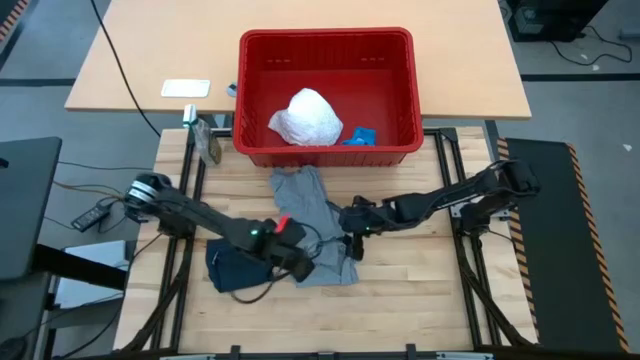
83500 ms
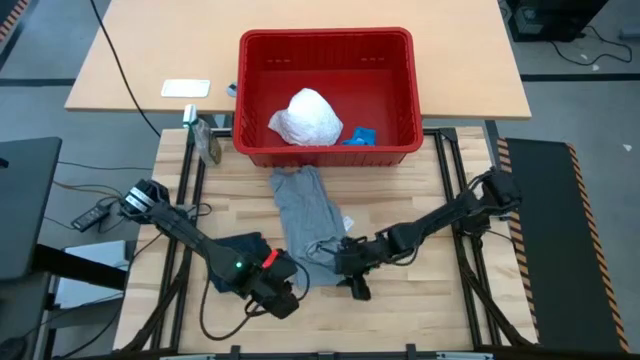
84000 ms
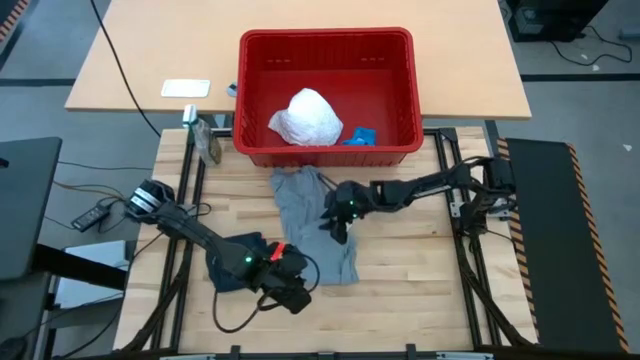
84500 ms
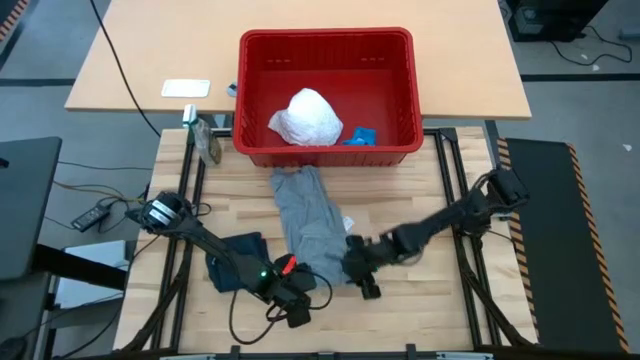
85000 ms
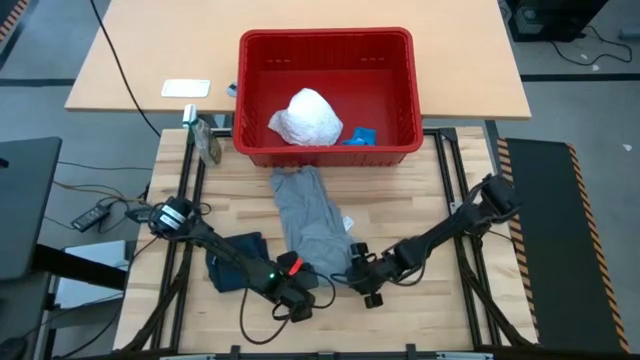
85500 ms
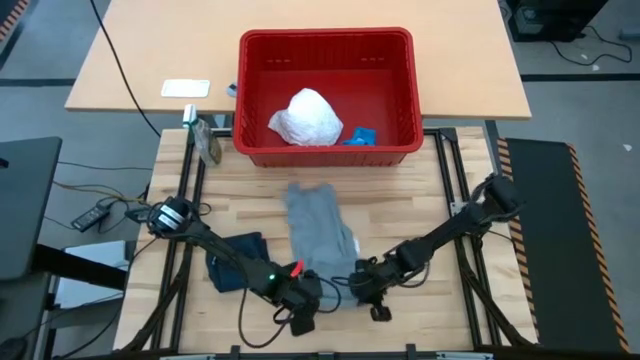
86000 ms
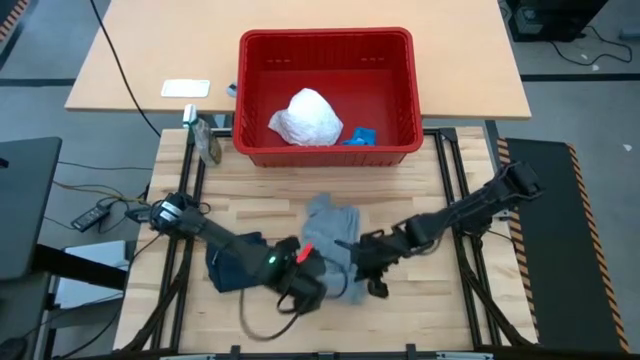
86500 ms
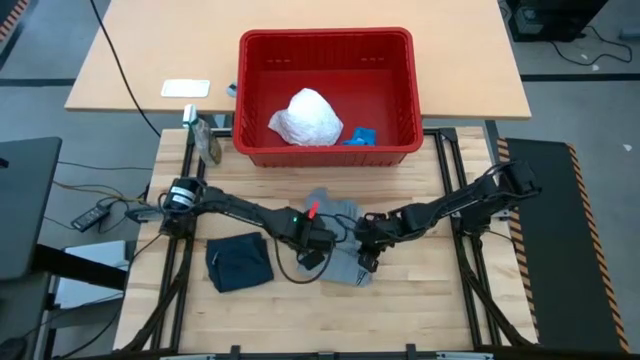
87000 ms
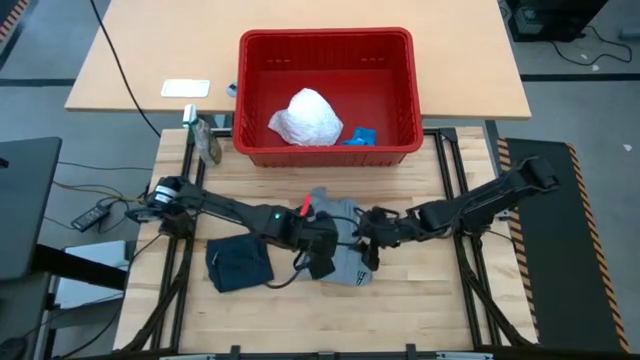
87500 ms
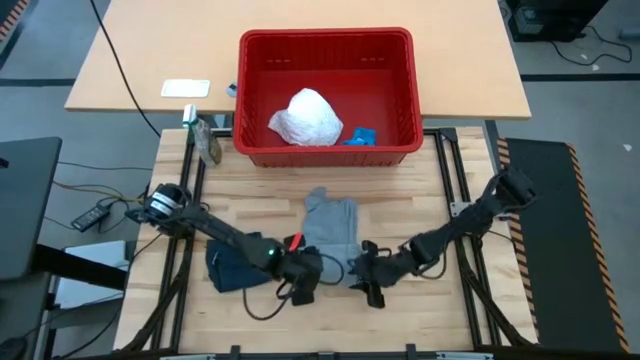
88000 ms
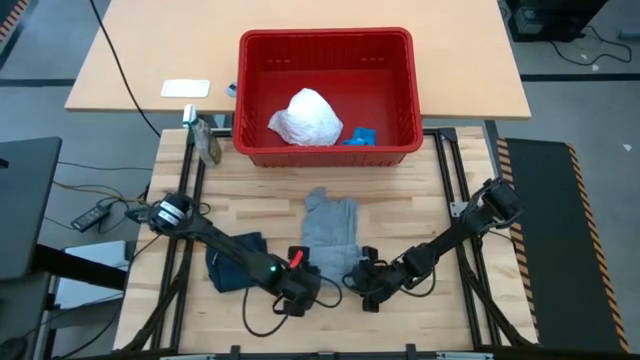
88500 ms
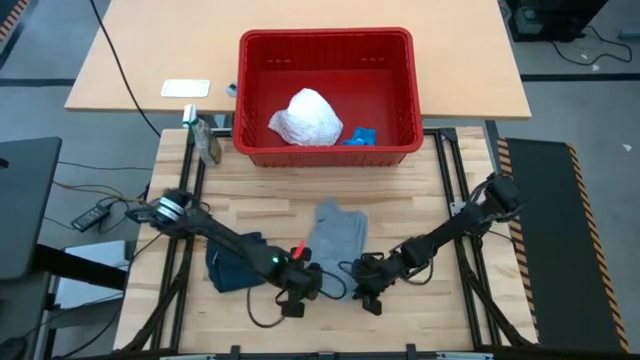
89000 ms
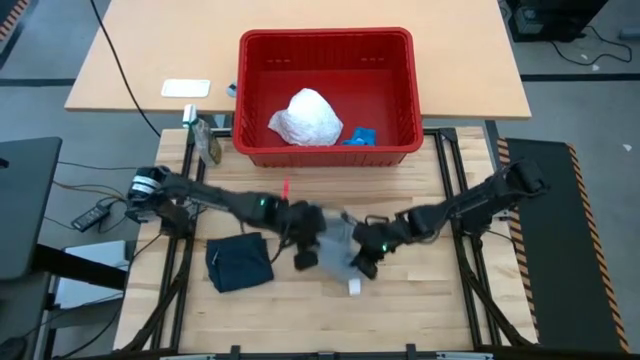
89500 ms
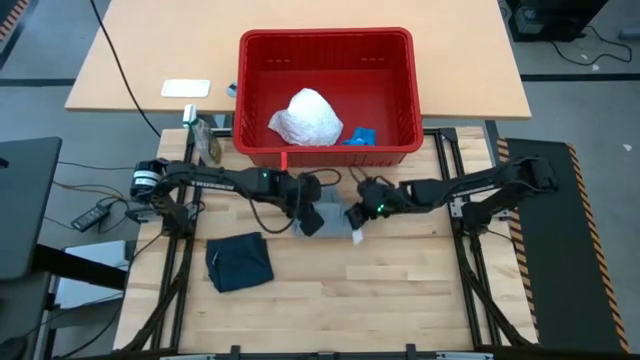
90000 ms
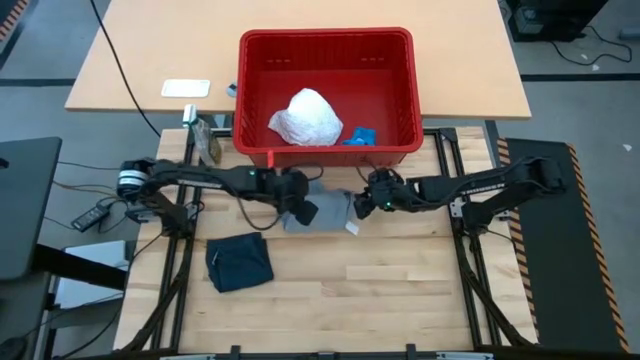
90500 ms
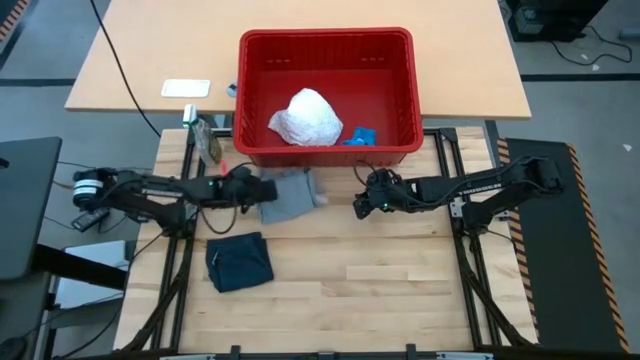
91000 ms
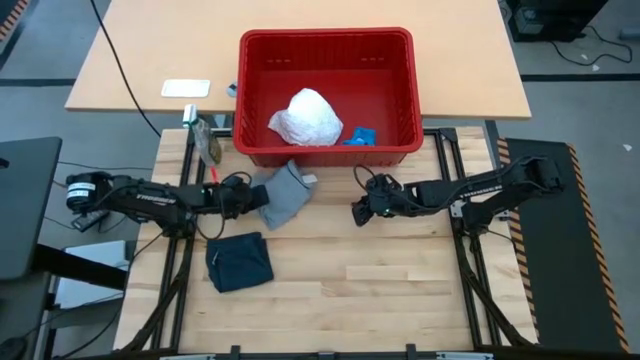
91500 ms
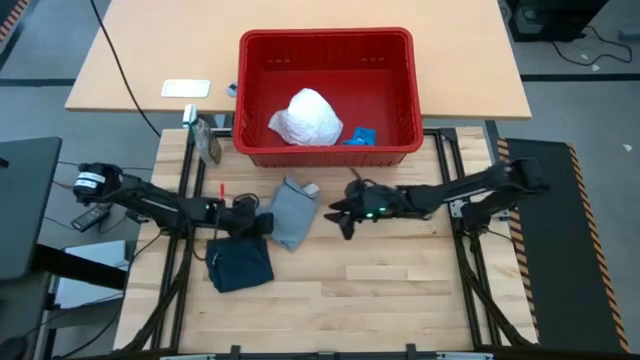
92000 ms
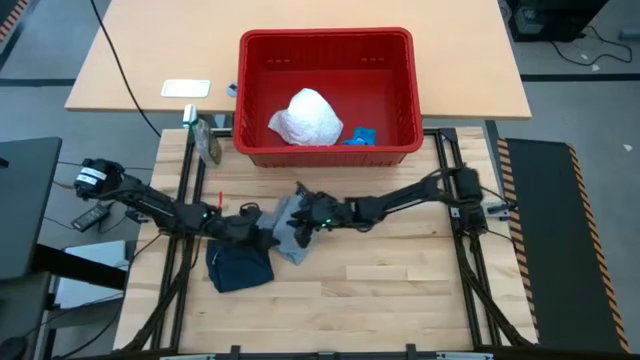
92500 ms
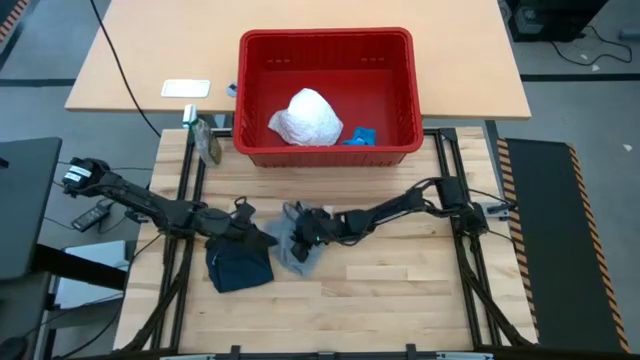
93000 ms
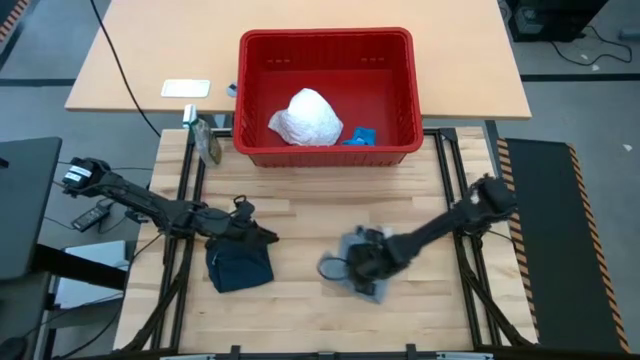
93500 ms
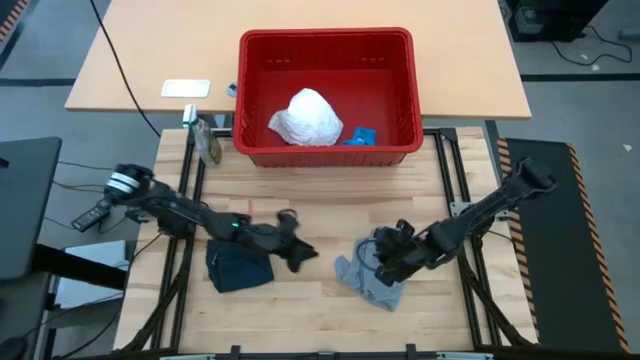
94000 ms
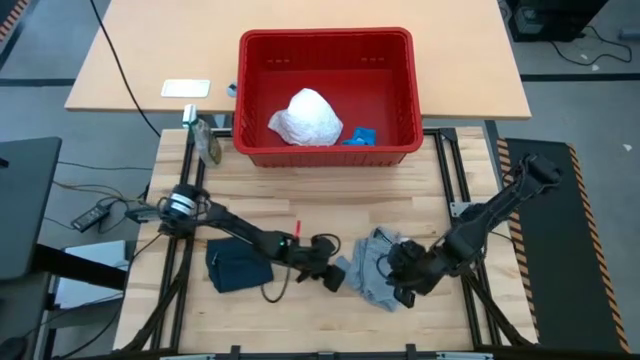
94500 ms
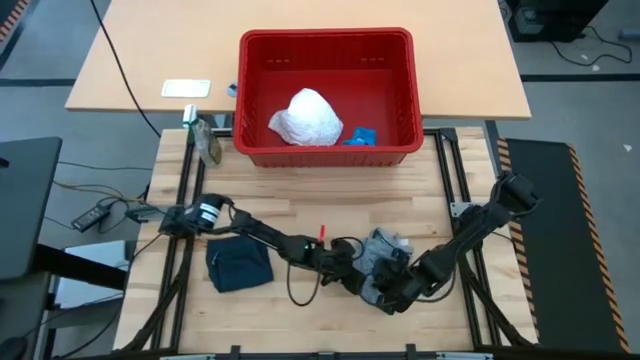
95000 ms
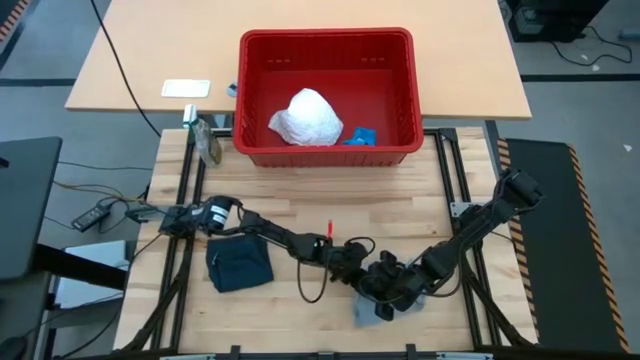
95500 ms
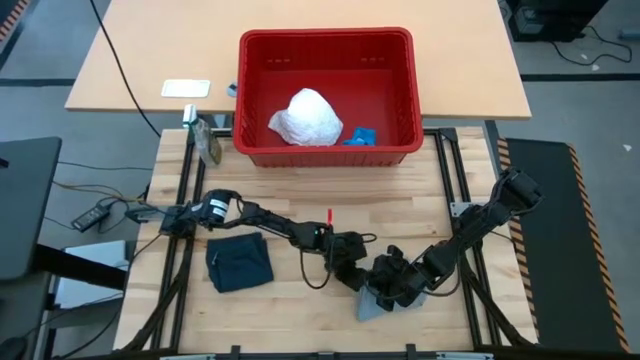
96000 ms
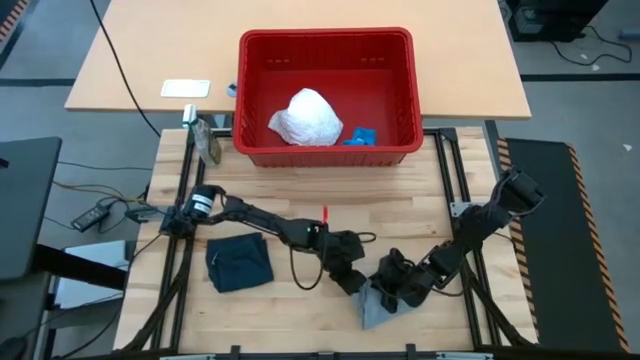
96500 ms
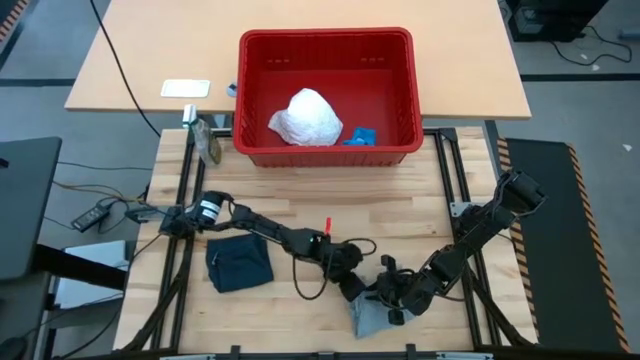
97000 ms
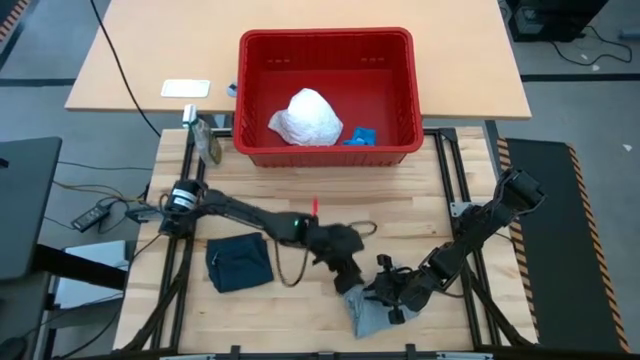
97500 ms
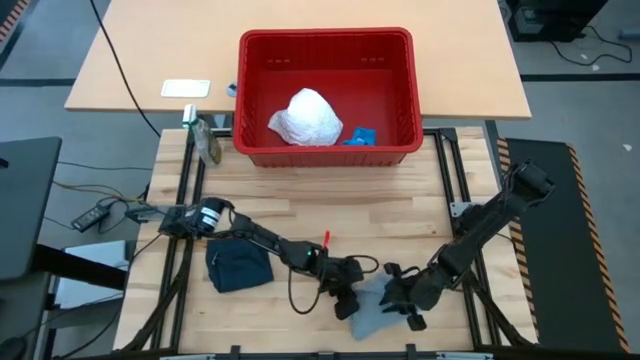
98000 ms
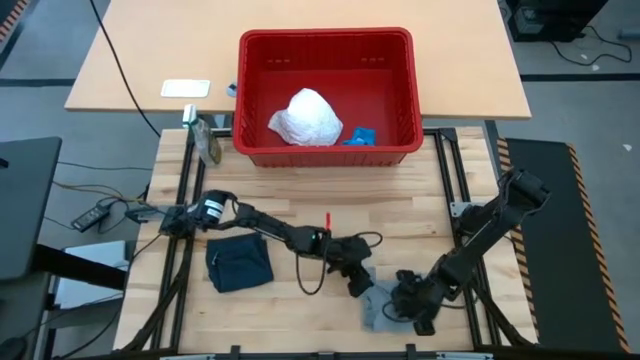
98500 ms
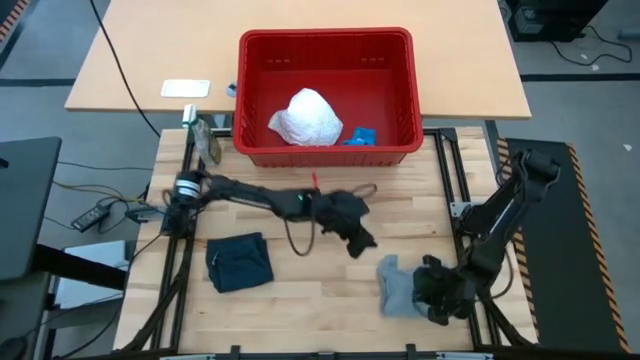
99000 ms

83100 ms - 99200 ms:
Task: Fold laundry
Fold the gray shirt

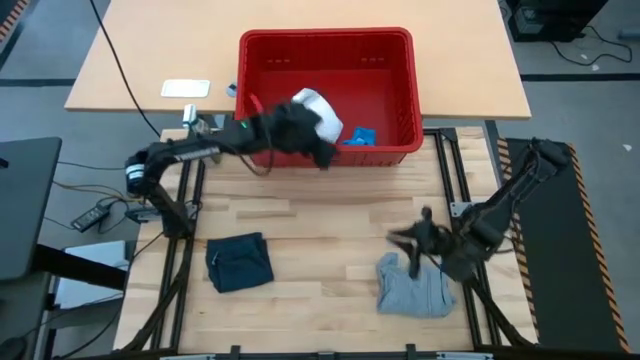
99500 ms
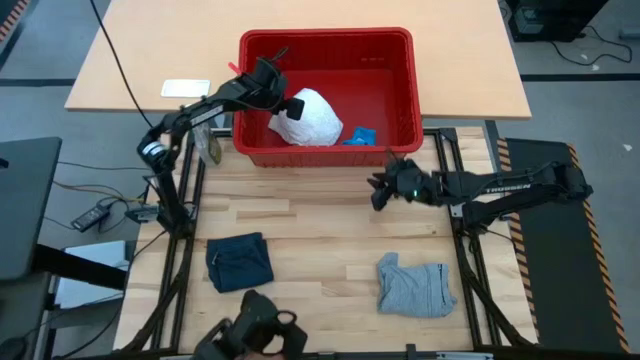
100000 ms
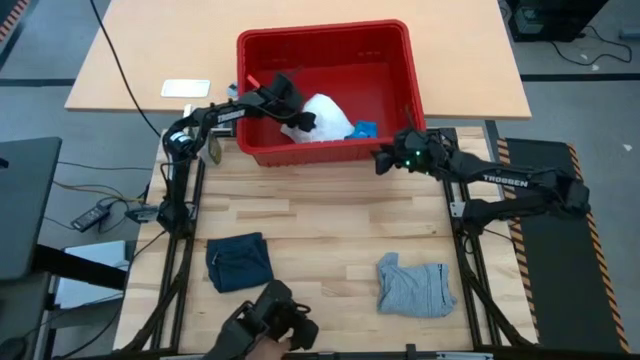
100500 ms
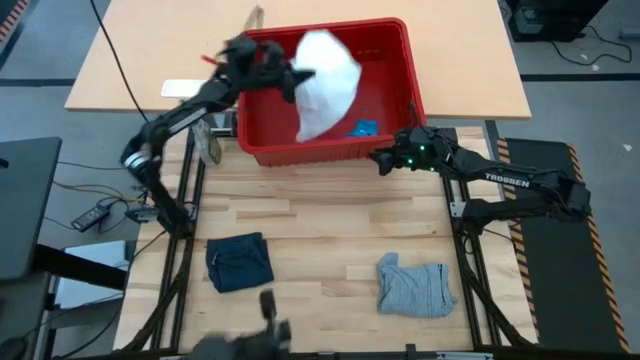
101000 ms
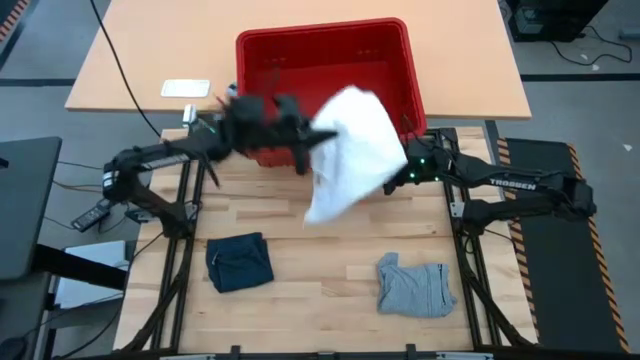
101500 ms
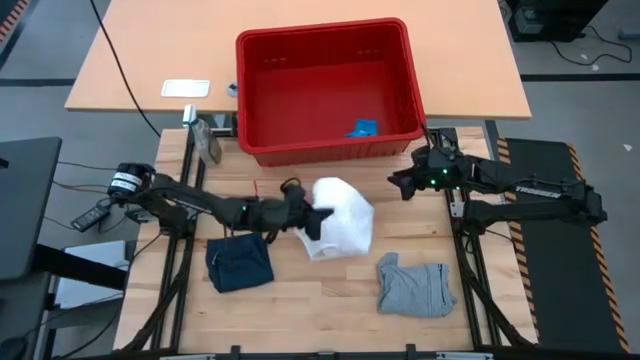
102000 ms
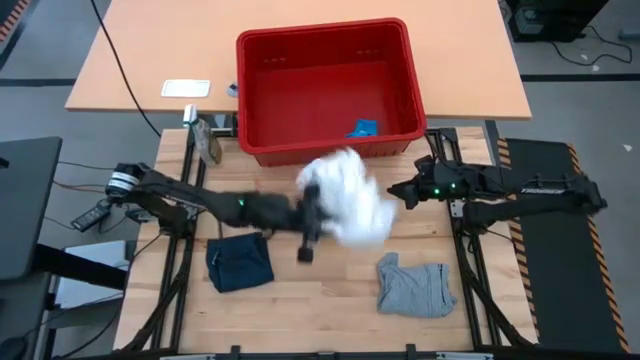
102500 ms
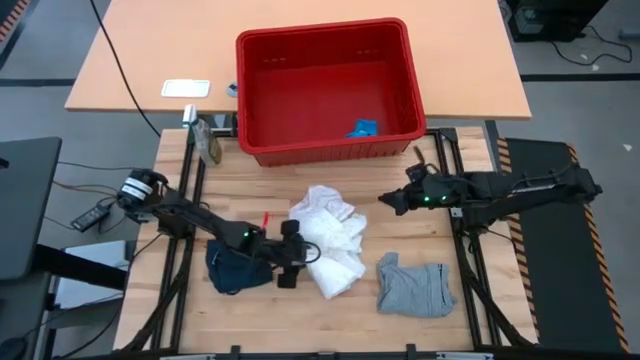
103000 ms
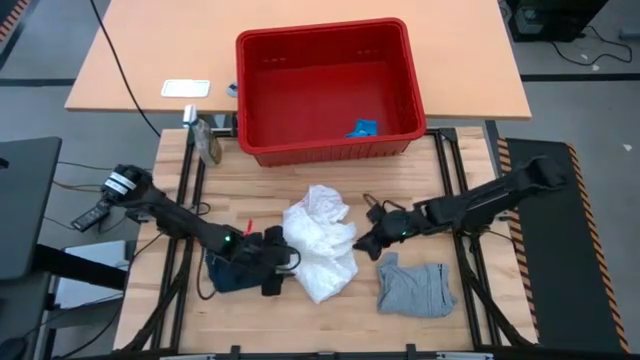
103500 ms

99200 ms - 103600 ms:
Remove the white dress from the red laundry bin
